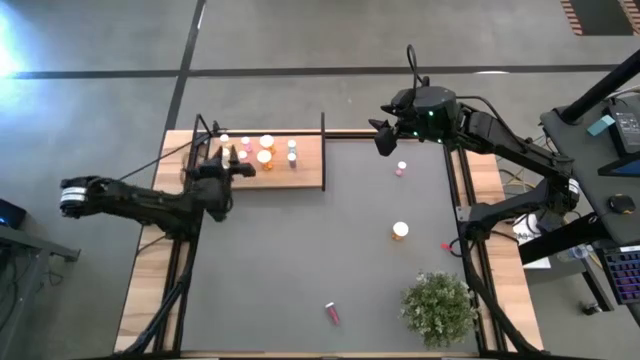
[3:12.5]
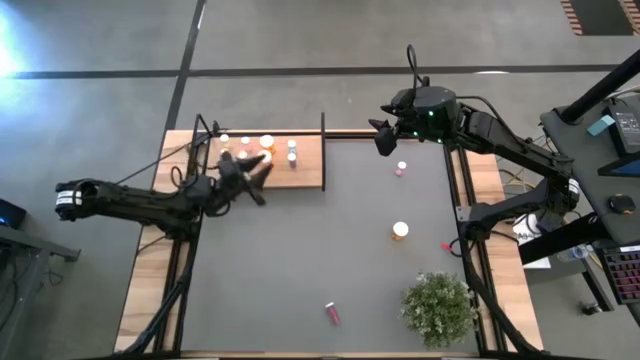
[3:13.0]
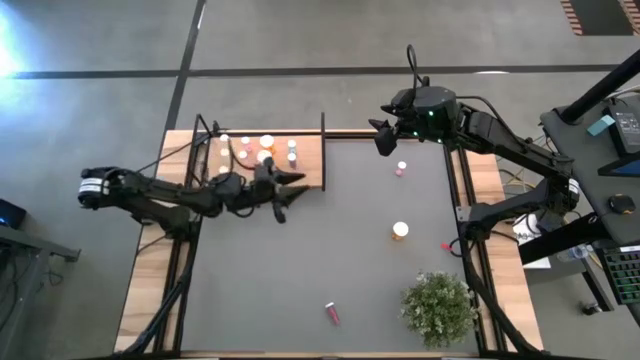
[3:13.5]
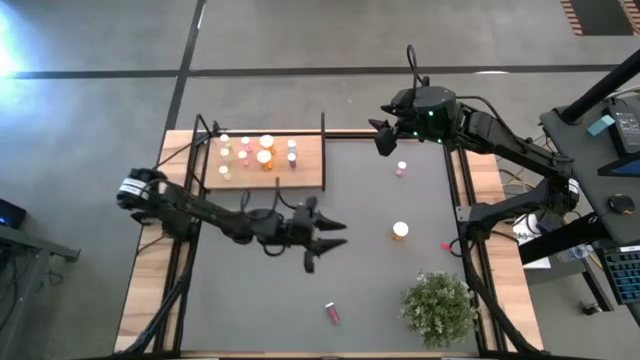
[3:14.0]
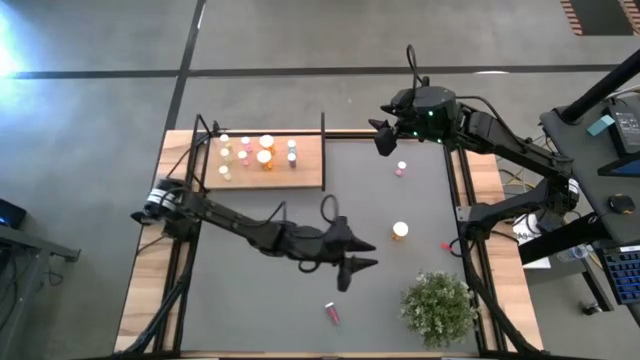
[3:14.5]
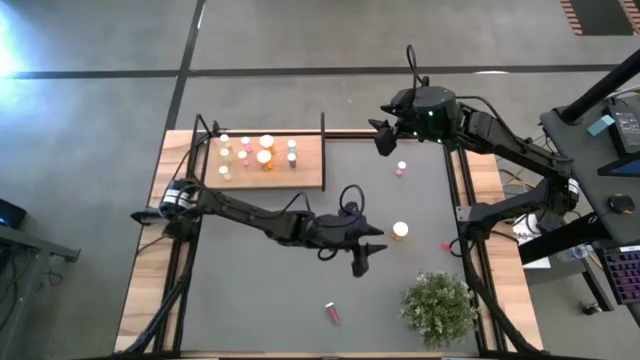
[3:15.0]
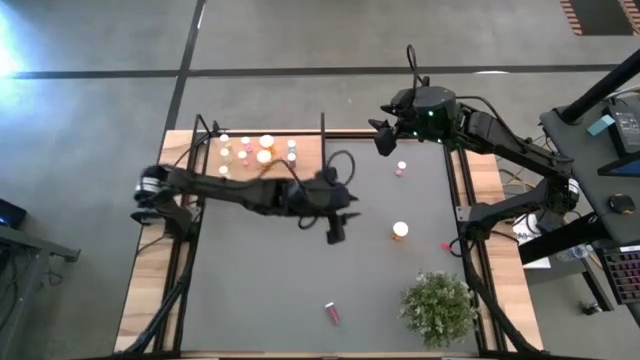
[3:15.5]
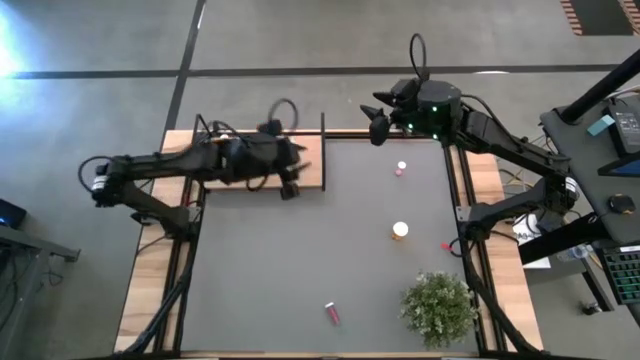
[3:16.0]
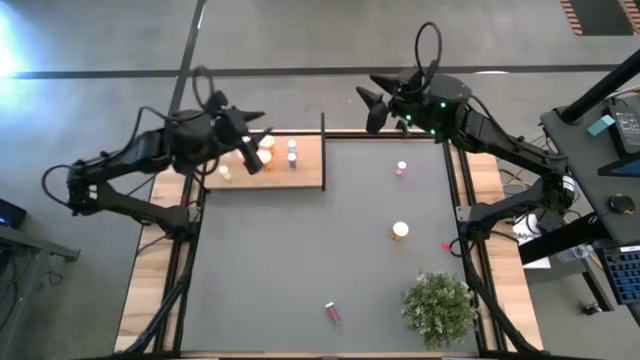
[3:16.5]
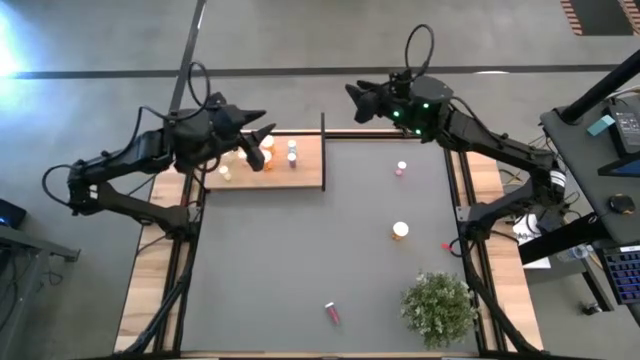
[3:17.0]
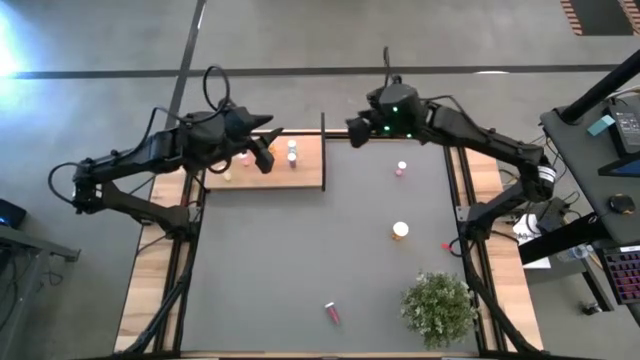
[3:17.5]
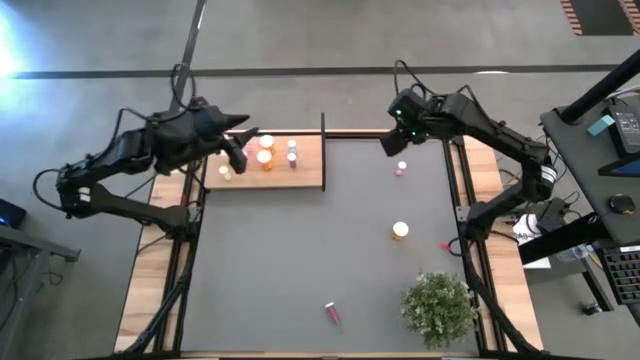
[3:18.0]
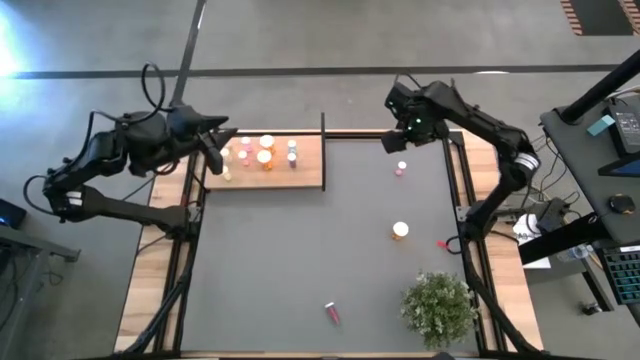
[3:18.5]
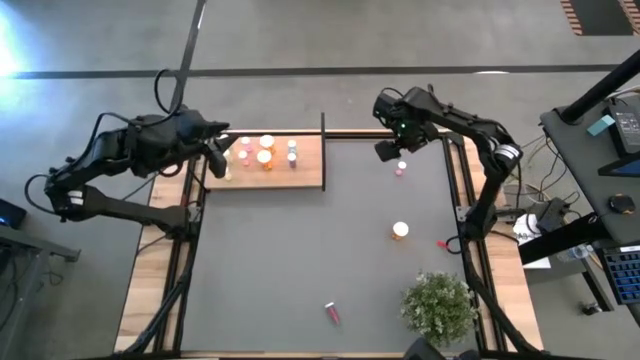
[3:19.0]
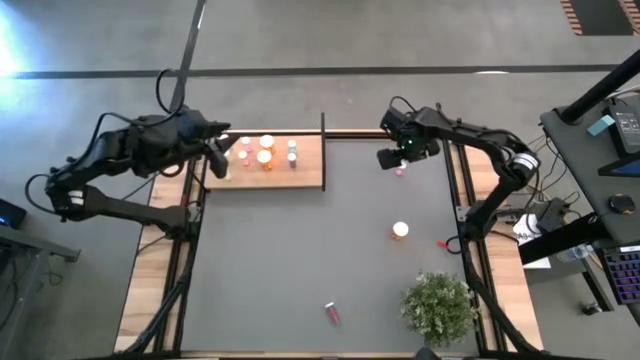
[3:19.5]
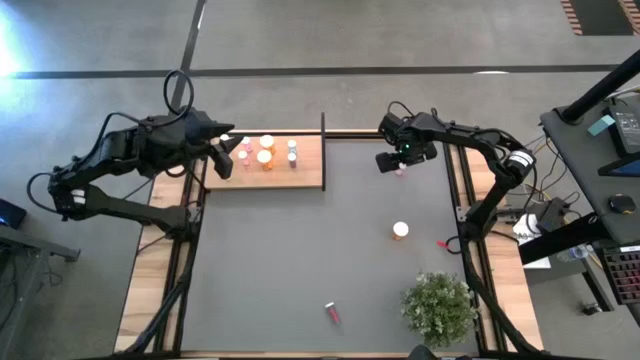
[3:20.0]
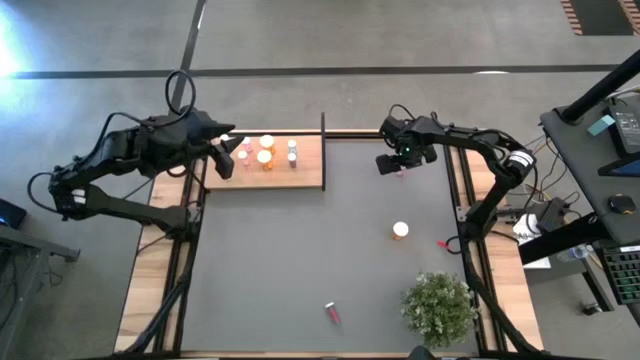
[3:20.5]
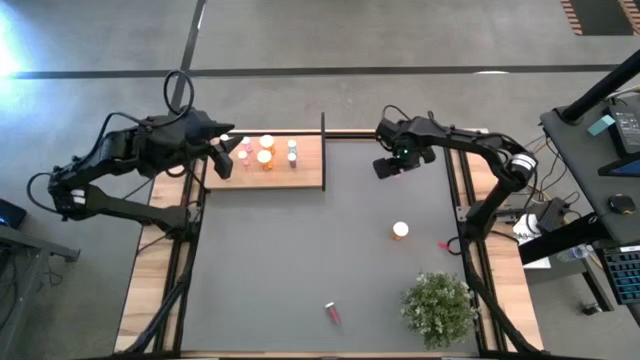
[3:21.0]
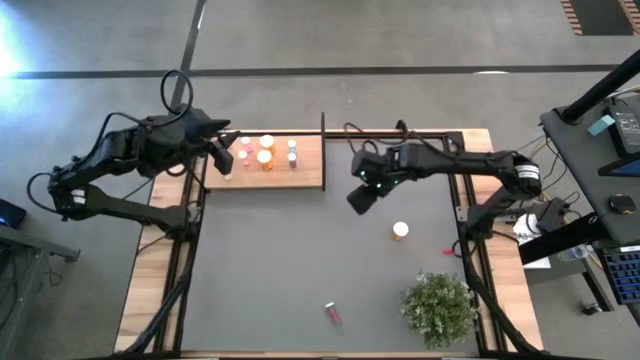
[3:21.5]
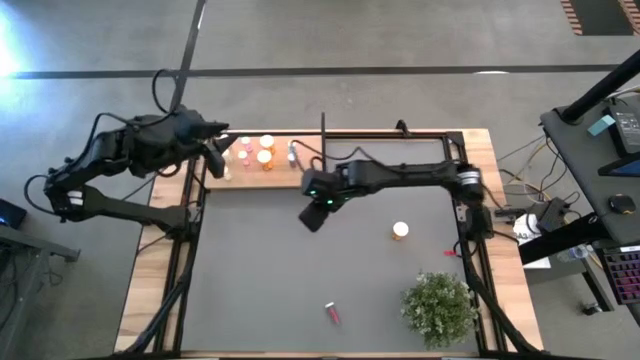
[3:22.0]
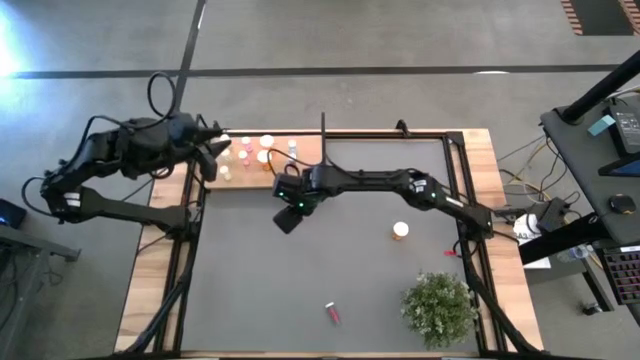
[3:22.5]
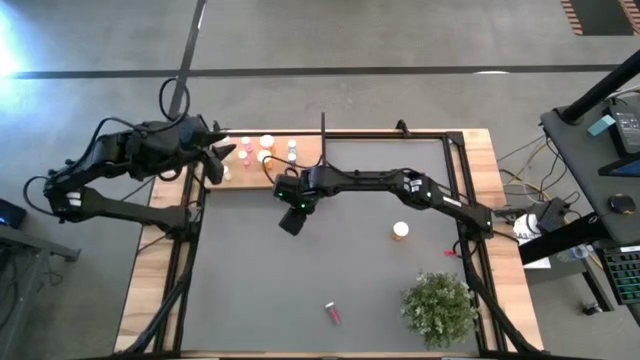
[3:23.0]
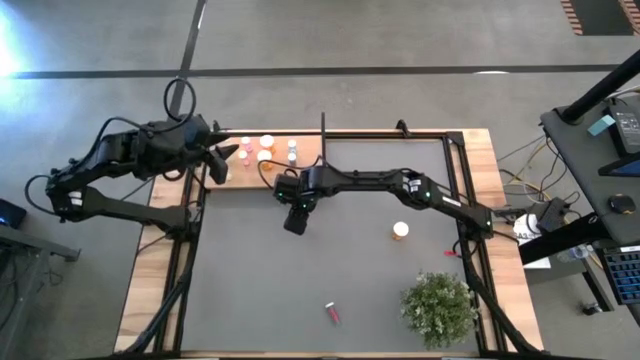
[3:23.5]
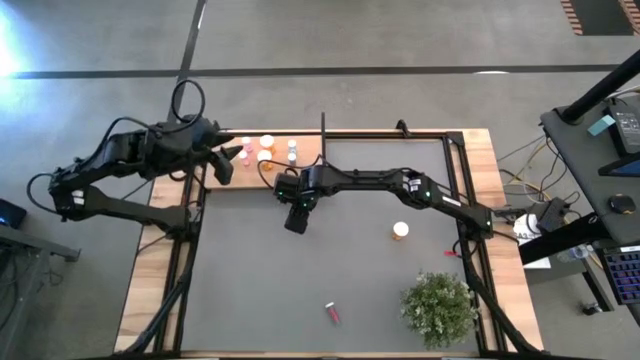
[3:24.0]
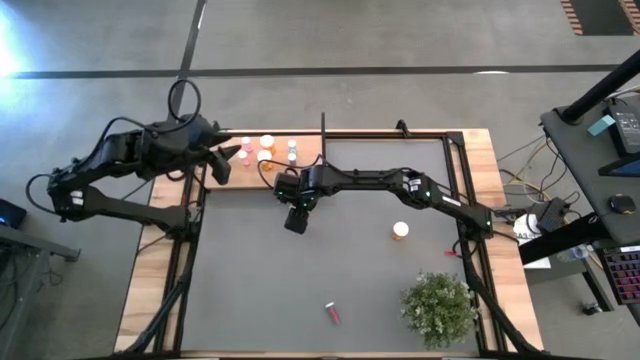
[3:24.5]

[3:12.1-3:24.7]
Task: Pick and place medicine bottles onto shelf by color
Move the pink pill bottle to the center of the table

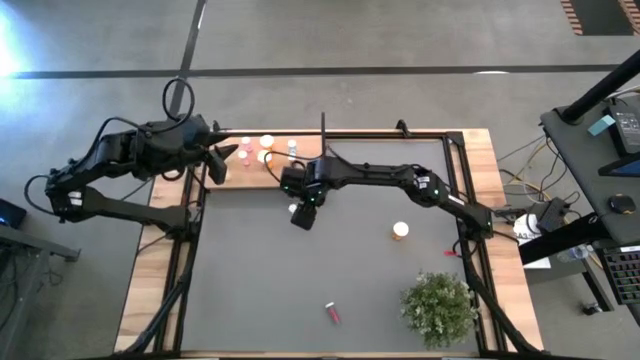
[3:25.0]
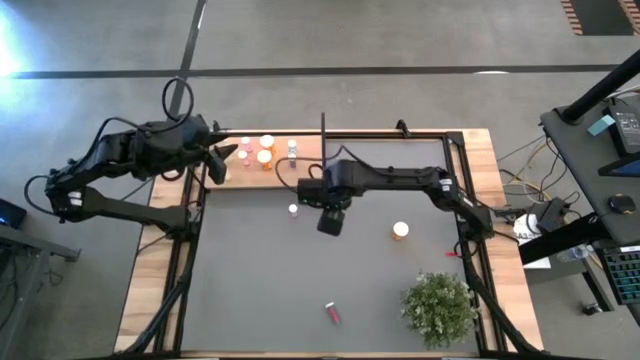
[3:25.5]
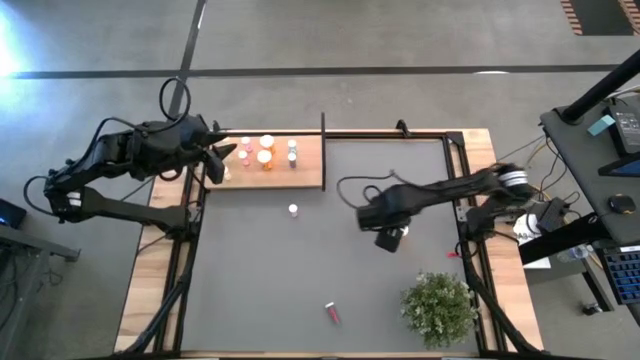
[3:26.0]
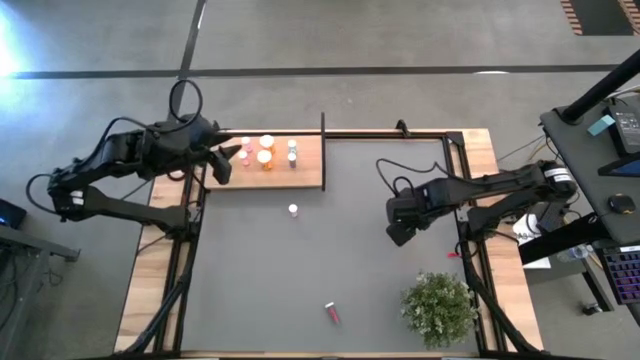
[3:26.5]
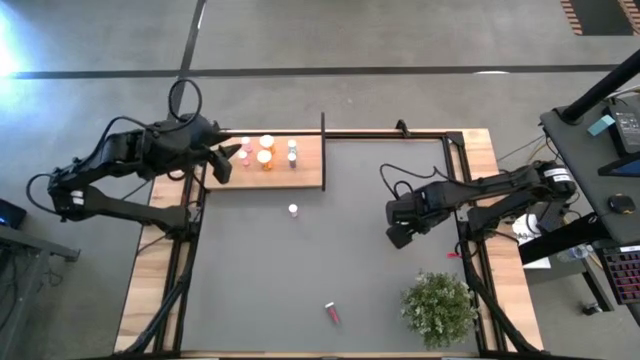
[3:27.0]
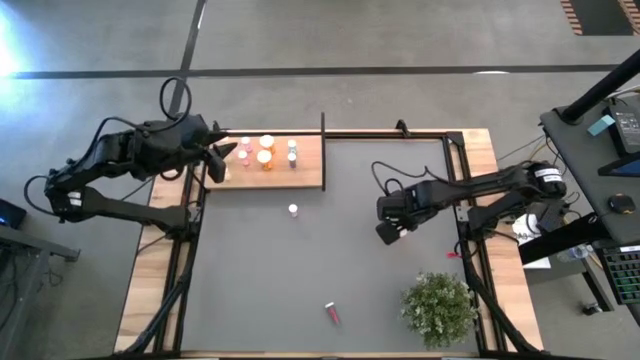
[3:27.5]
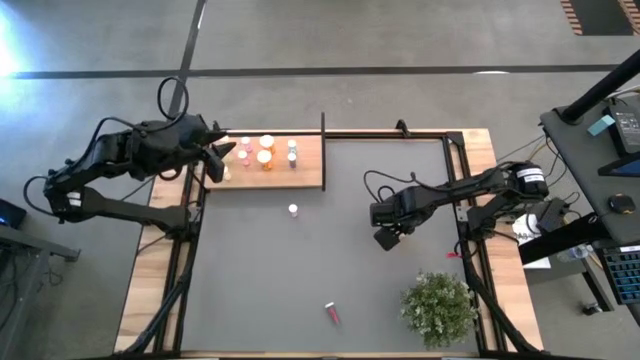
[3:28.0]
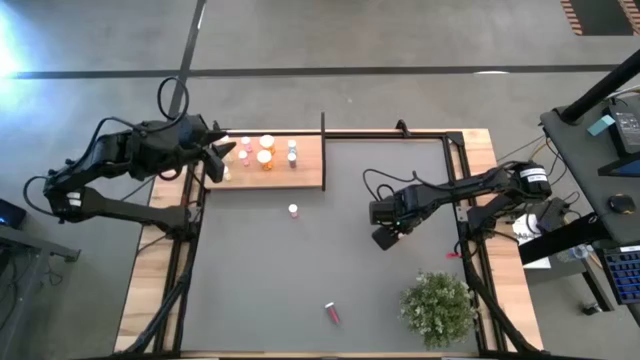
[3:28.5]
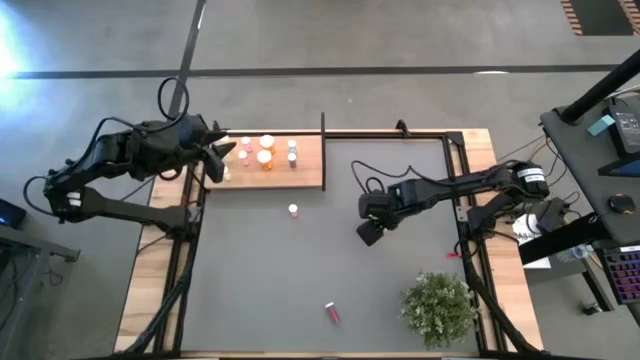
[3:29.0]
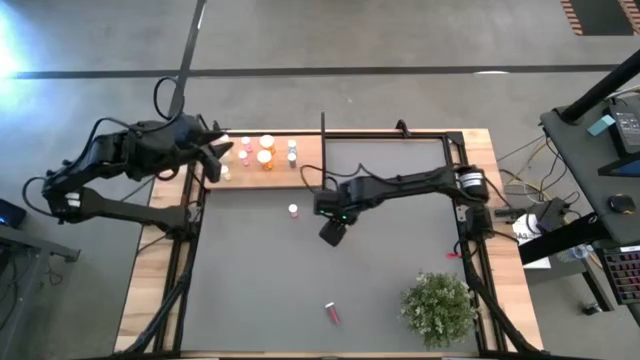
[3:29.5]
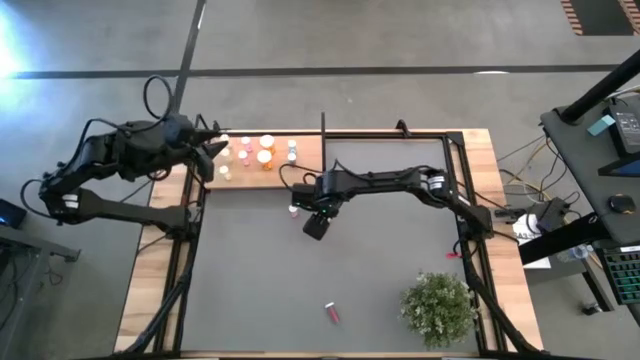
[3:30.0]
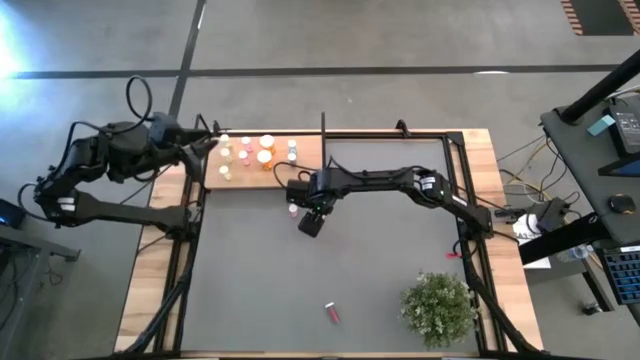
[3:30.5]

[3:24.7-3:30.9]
Move the orange pill bottle to the center of the table

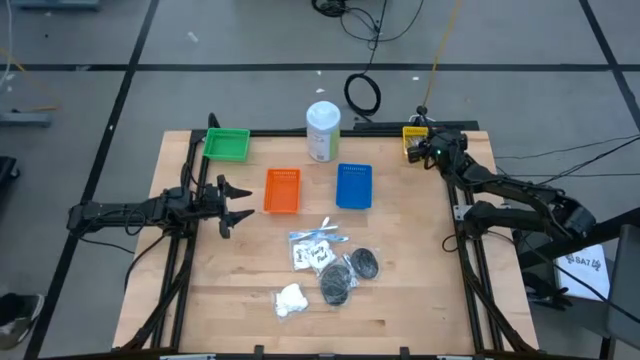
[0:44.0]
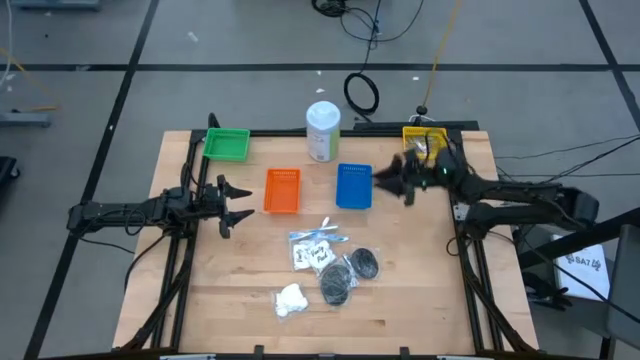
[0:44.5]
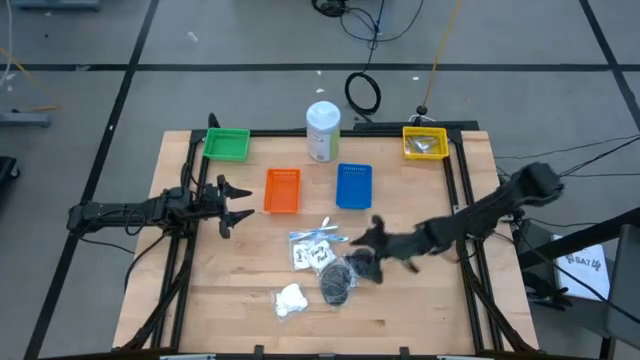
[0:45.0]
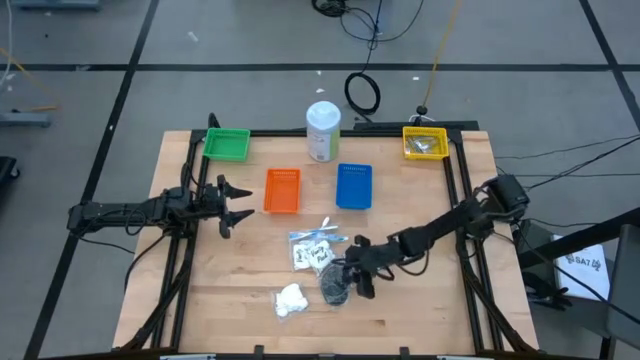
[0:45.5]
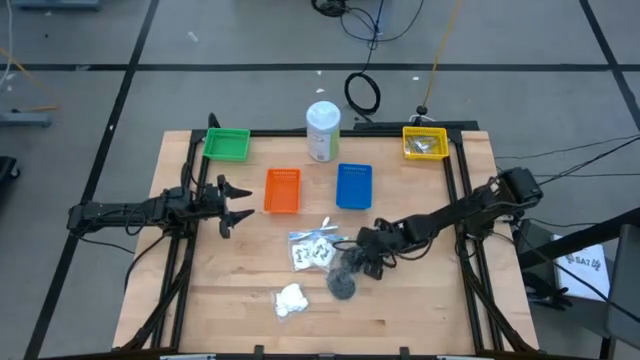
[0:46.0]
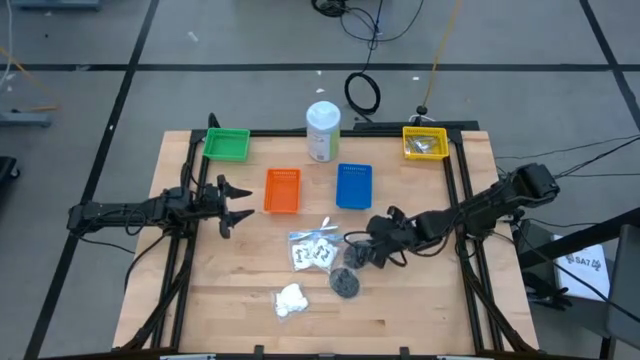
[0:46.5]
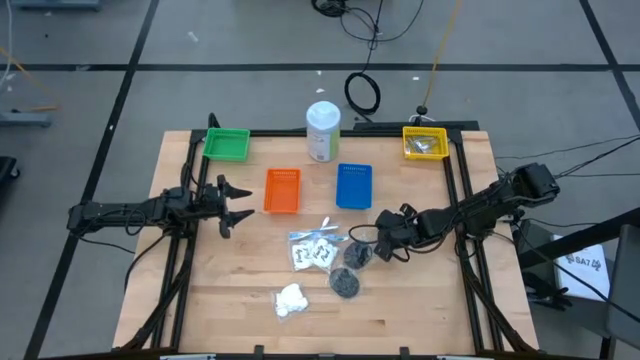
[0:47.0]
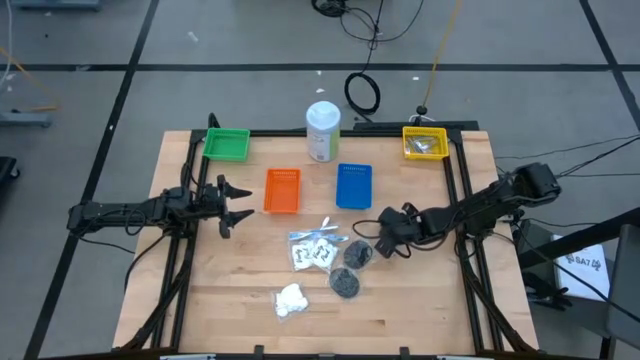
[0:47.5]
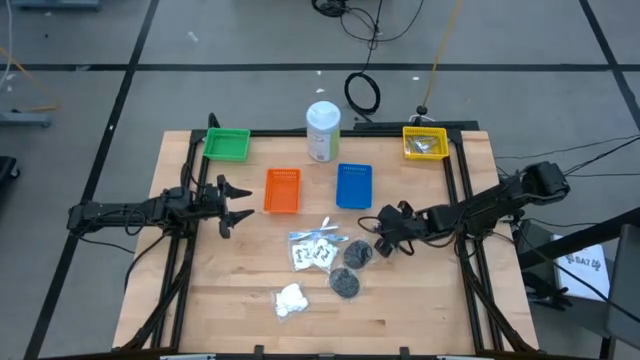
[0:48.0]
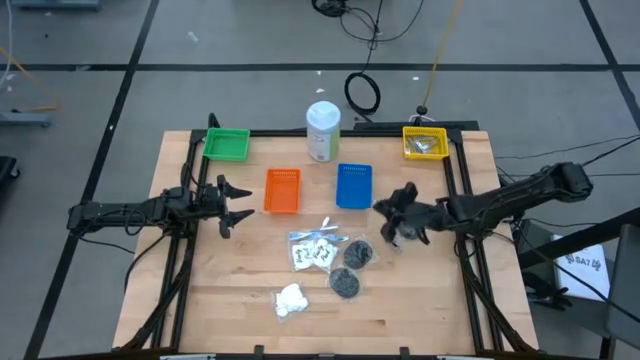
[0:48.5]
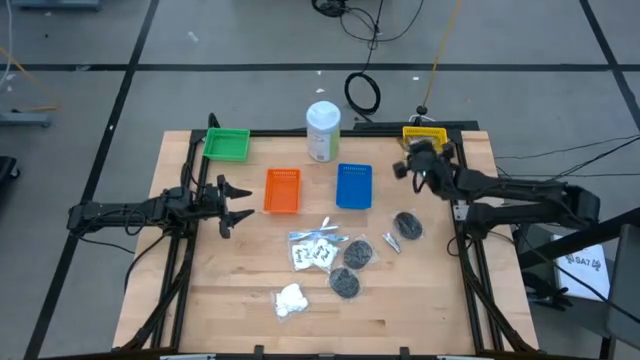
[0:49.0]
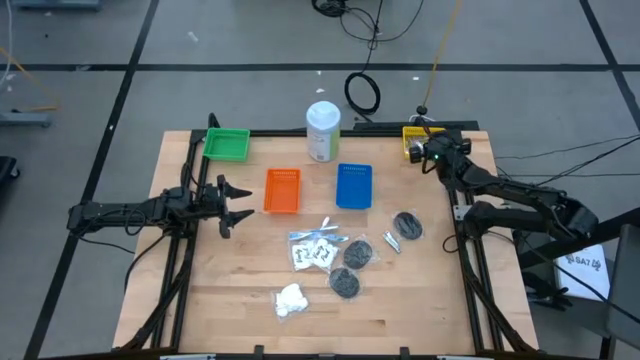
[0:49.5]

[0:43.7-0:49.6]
Task: Pick & Place Travel size toiletries
Put the nail cutter into the yellow bin
